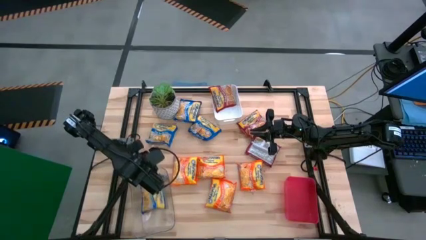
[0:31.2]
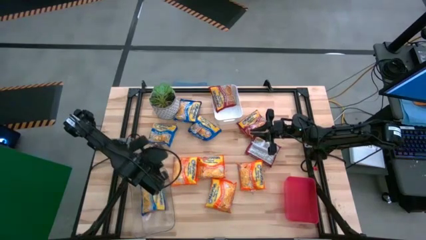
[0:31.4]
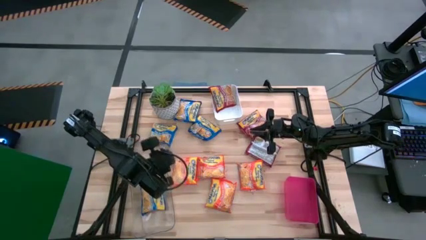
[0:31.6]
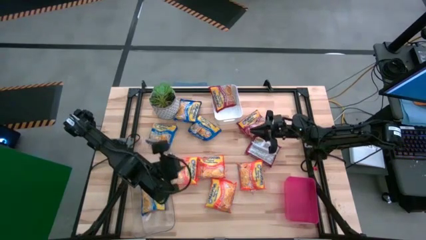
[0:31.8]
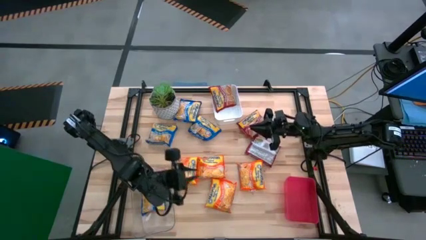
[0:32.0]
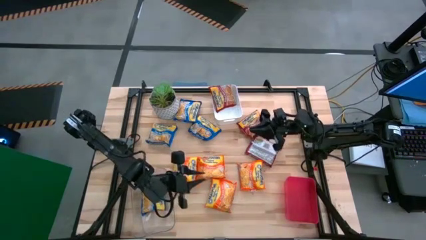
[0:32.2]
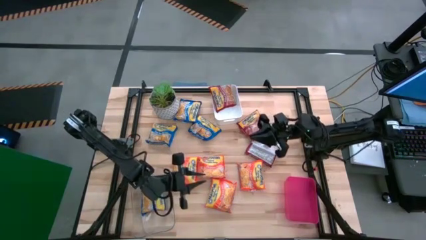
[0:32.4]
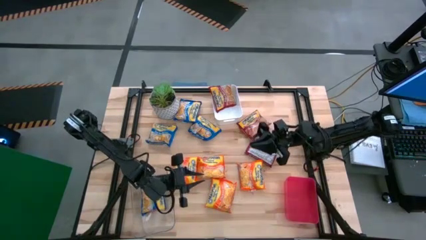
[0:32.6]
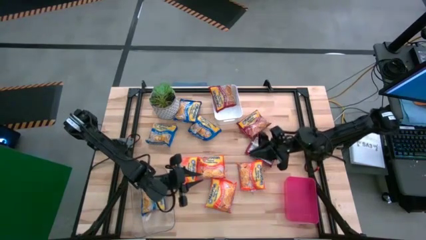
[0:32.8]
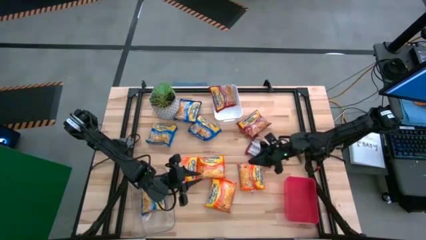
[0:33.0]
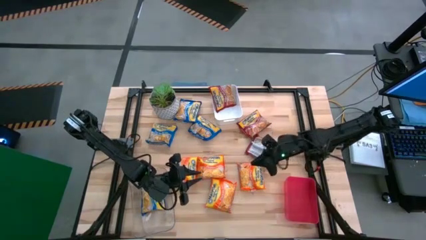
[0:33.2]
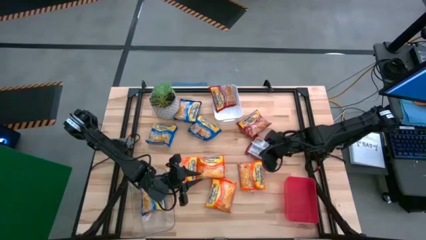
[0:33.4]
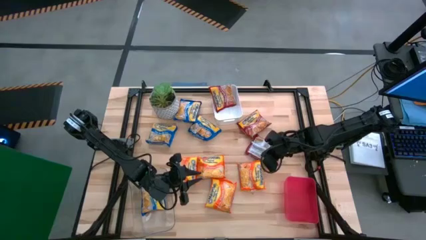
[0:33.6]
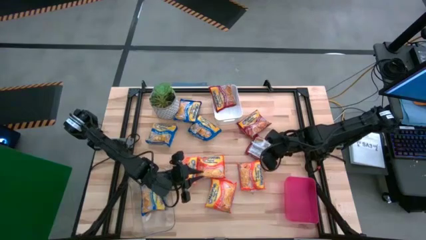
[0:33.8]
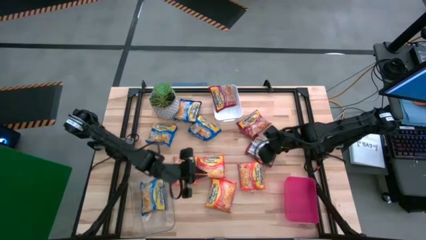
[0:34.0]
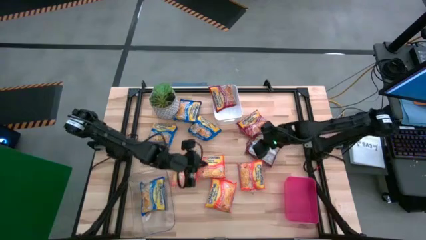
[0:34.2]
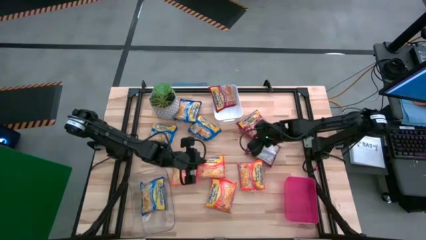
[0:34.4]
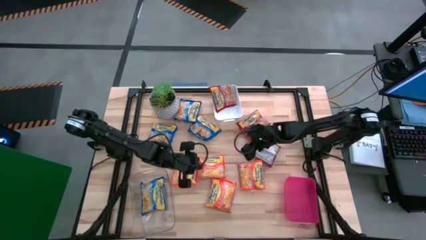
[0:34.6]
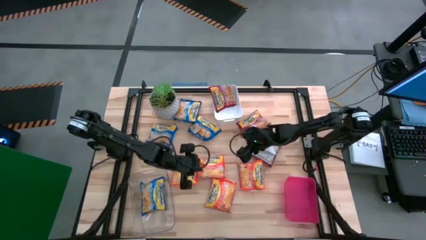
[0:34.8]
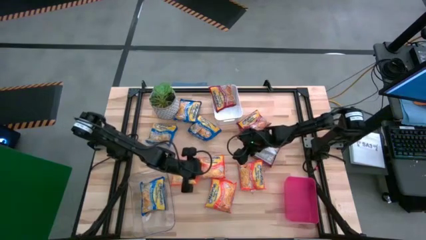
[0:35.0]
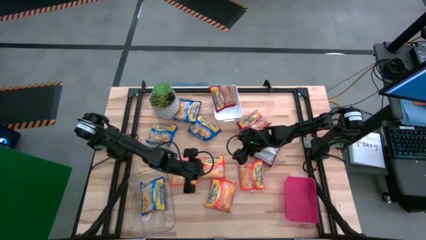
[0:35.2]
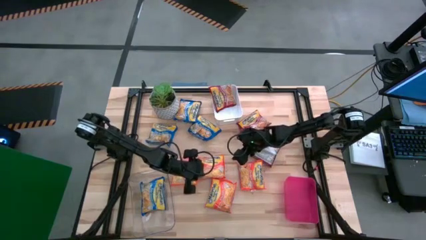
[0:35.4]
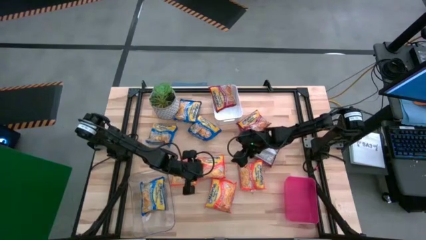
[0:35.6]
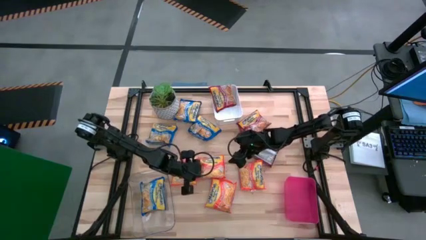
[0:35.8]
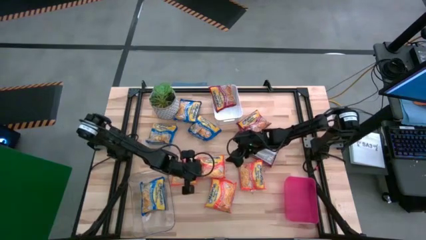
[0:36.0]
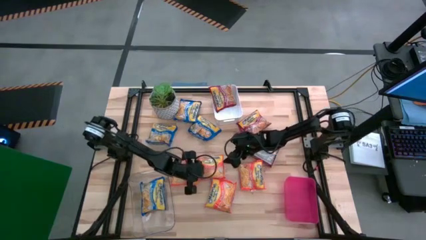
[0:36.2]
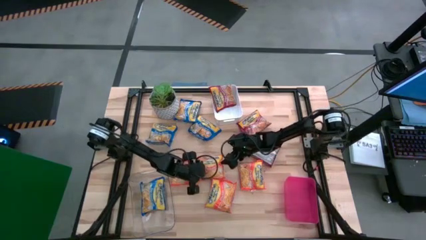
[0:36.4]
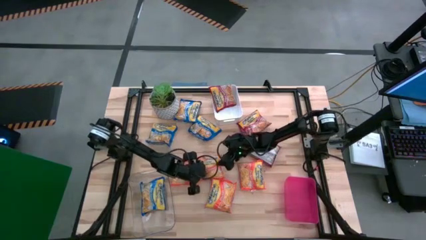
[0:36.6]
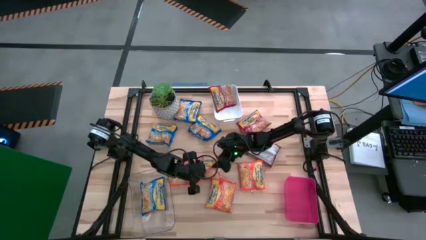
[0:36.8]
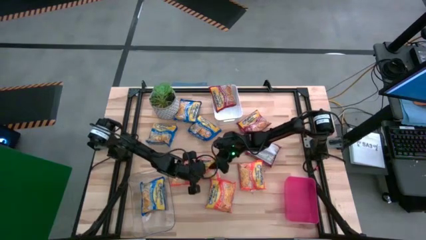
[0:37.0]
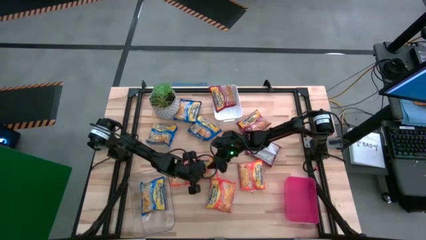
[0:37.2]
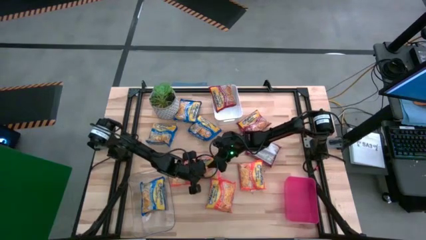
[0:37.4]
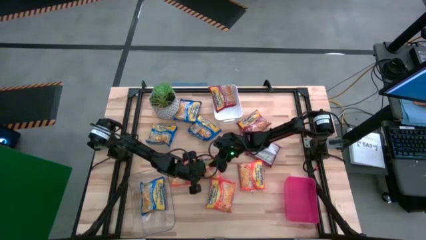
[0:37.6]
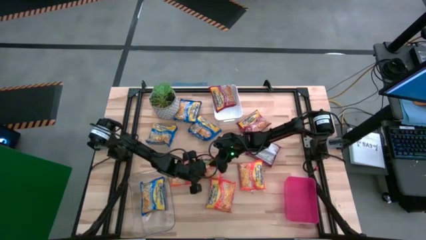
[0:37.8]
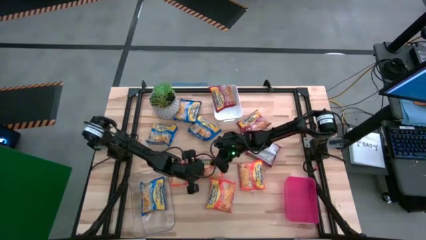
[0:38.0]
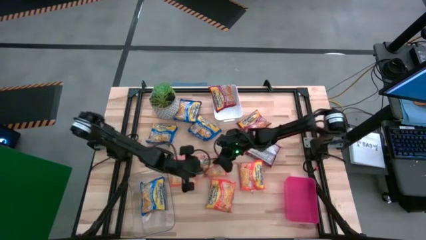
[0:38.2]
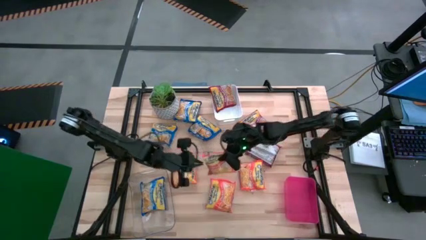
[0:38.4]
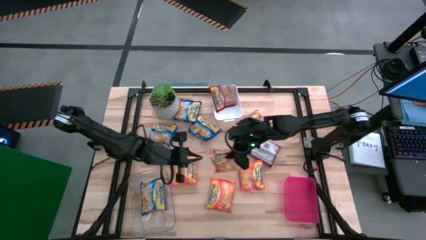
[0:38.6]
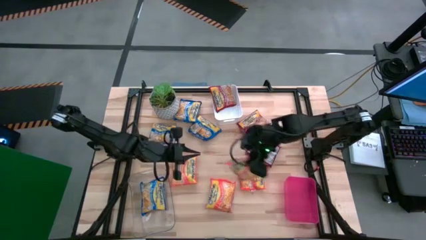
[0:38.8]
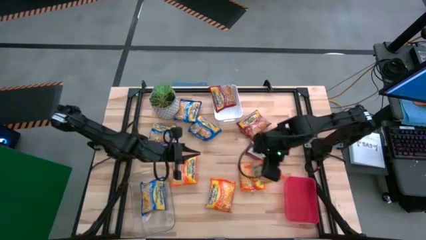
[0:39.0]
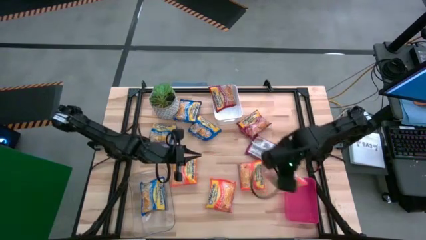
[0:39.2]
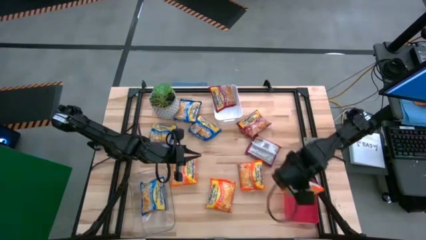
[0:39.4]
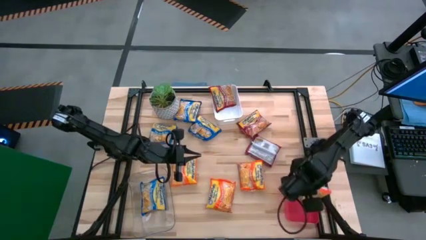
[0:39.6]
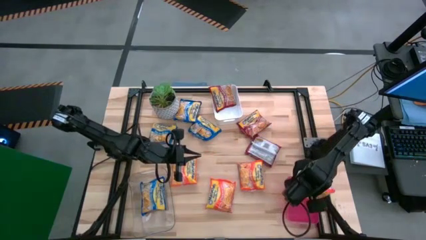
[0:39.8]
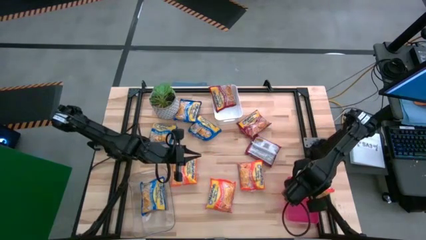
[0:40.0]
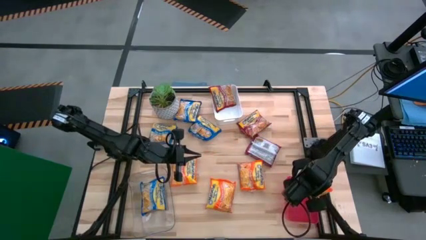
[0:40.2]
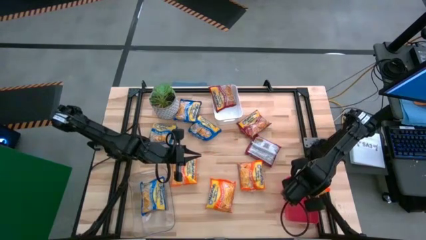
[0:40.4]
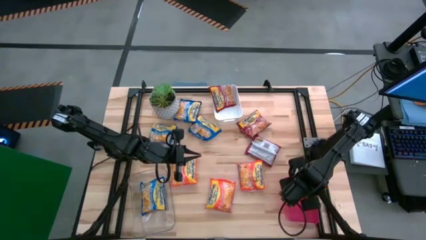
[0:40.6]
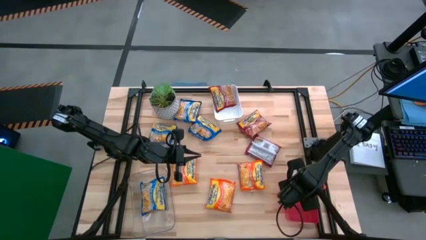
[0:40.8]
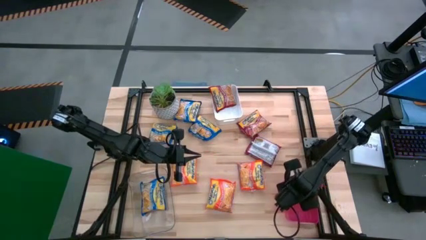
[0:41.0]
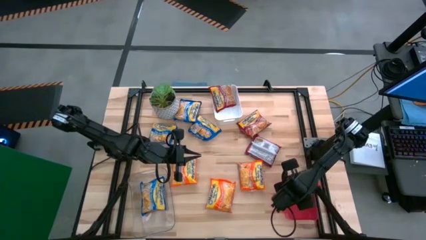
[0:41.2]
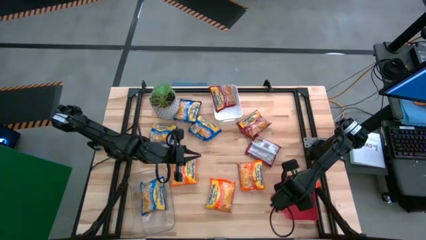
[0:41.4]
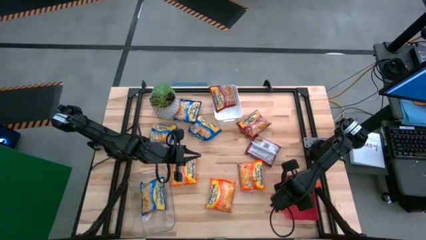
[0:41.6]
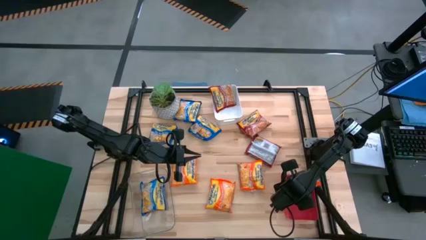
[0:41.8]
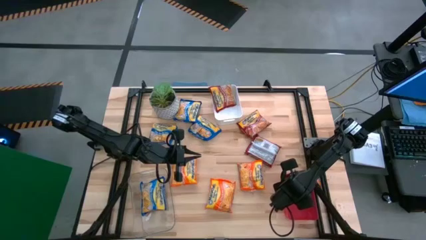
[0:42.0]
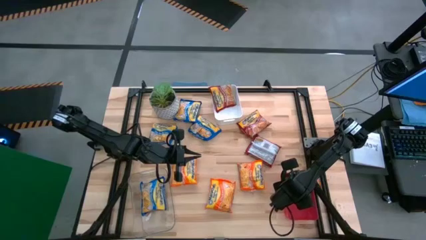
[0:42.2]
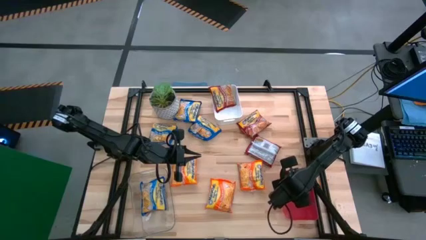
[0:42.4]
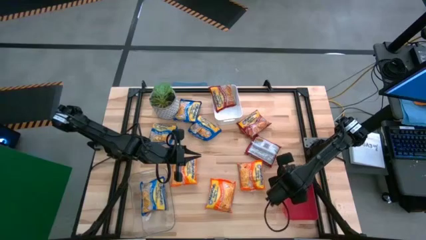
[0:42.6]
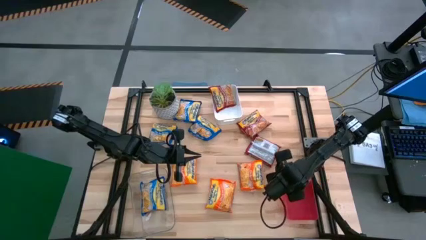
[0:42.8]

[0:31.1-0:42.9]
Task: Sort Maruchan noodles
Put the top orange noodle pack into the pink bin

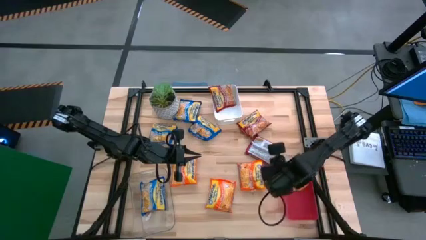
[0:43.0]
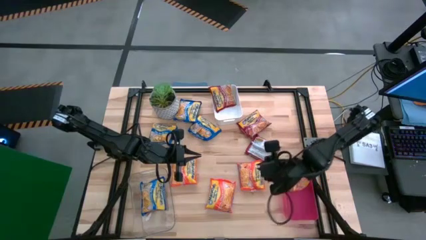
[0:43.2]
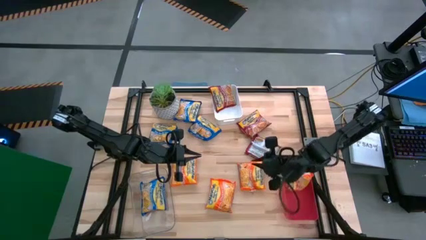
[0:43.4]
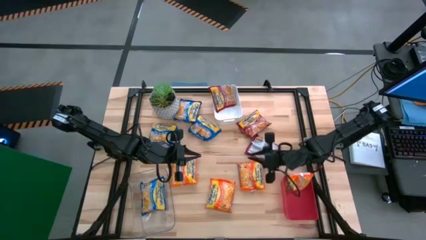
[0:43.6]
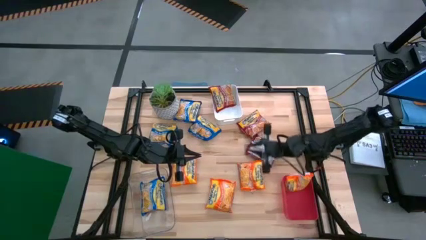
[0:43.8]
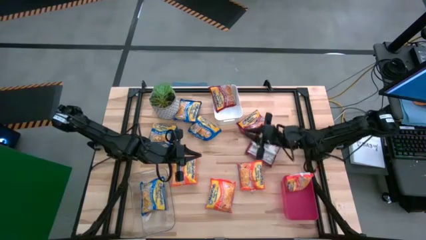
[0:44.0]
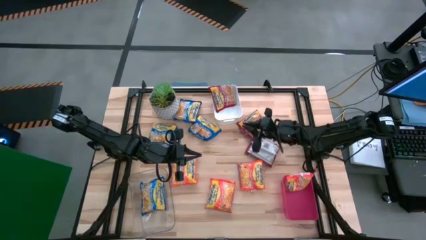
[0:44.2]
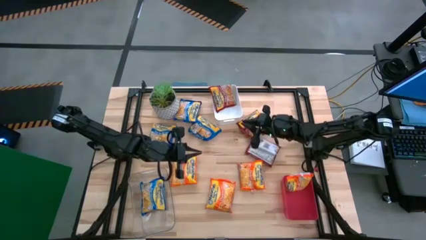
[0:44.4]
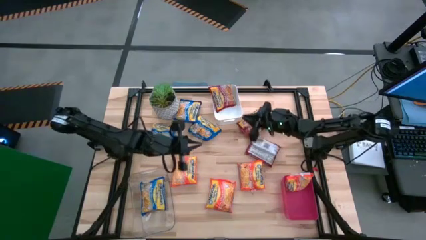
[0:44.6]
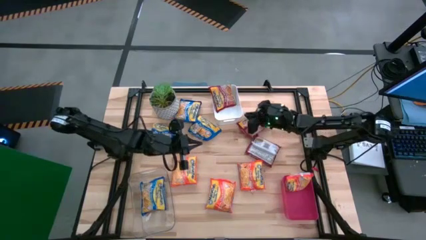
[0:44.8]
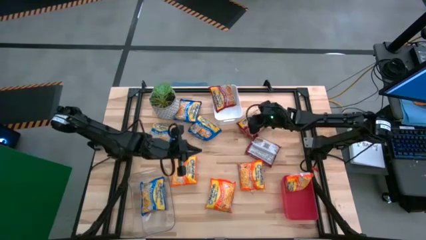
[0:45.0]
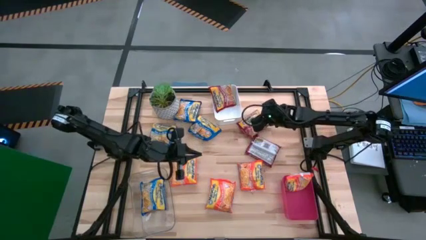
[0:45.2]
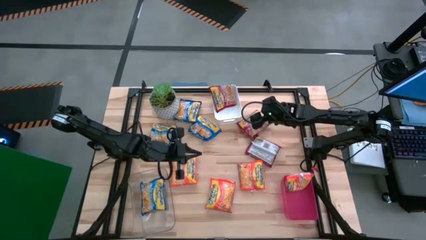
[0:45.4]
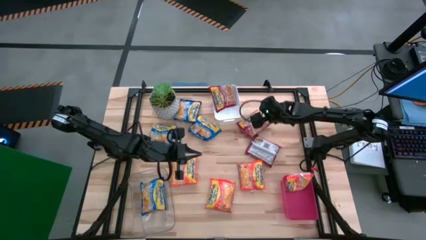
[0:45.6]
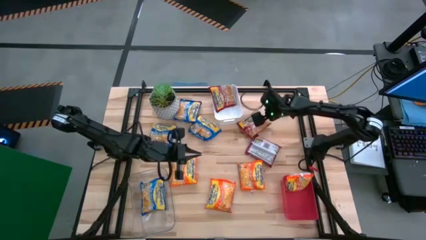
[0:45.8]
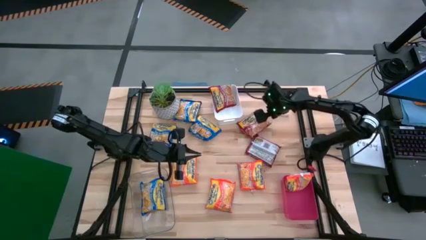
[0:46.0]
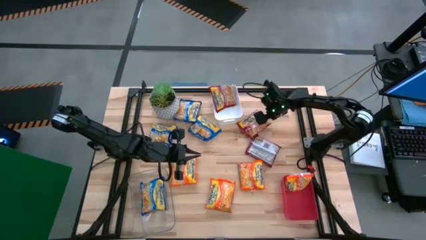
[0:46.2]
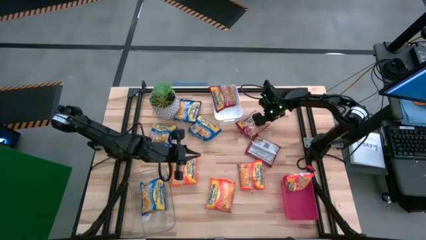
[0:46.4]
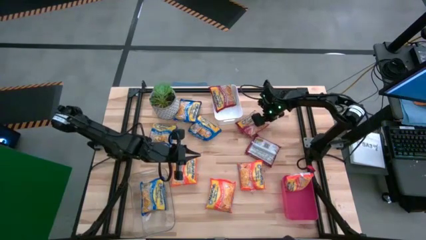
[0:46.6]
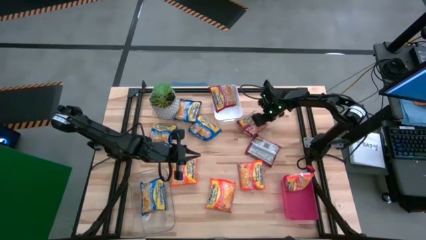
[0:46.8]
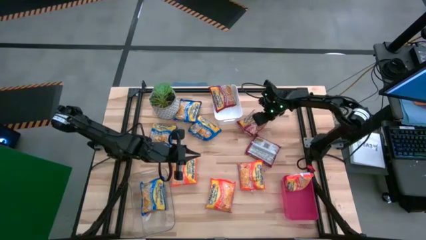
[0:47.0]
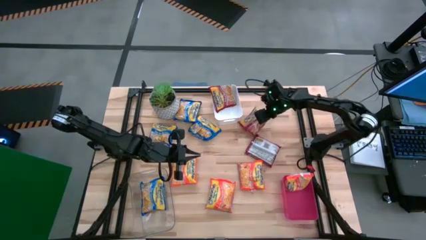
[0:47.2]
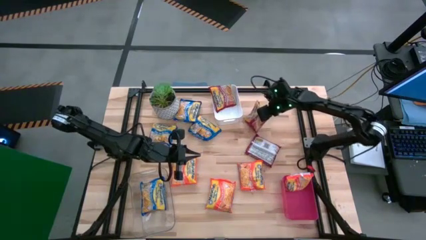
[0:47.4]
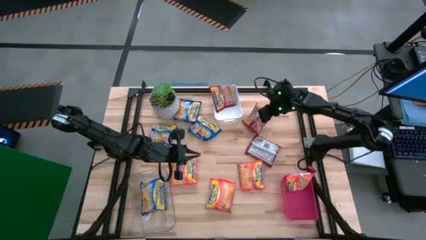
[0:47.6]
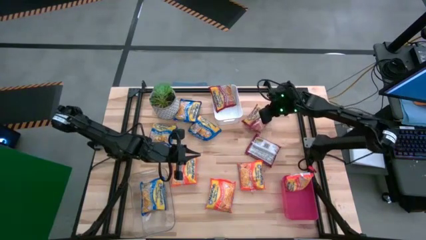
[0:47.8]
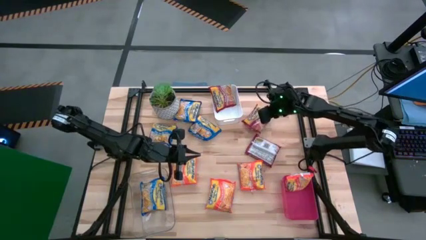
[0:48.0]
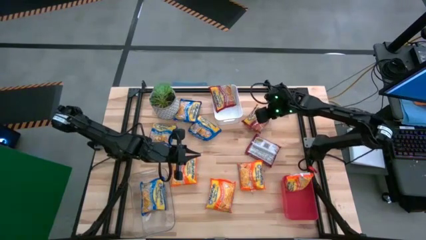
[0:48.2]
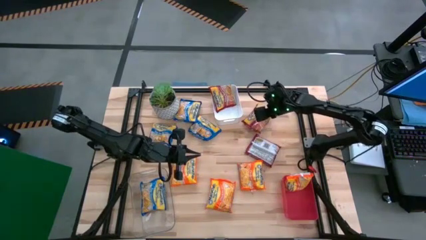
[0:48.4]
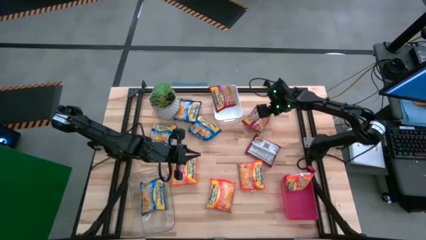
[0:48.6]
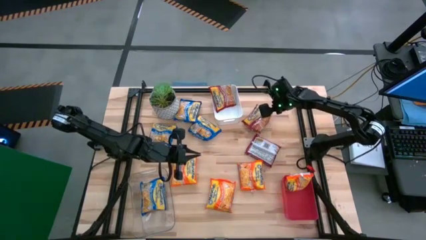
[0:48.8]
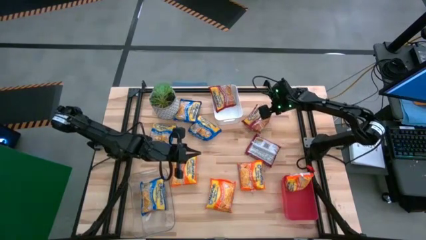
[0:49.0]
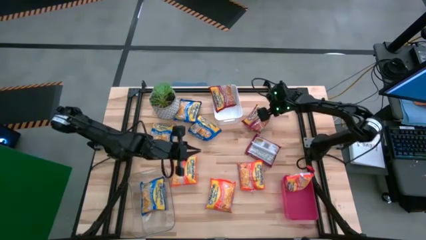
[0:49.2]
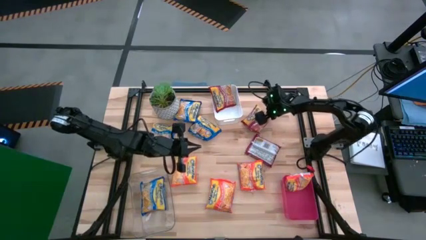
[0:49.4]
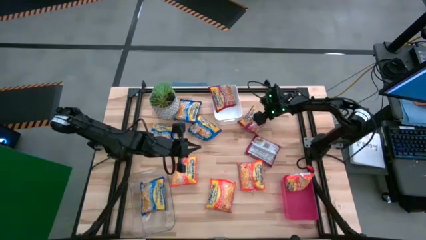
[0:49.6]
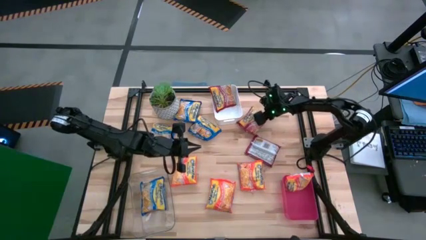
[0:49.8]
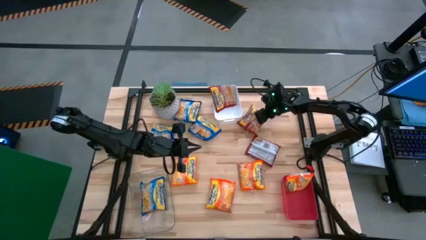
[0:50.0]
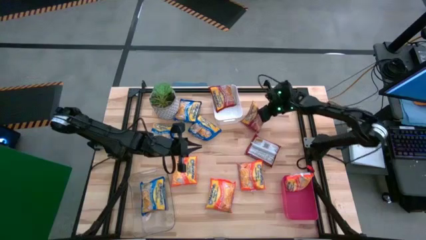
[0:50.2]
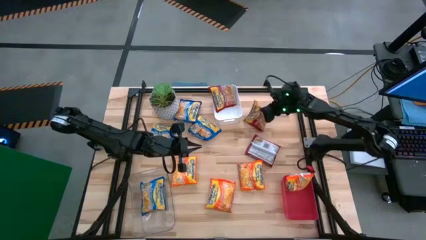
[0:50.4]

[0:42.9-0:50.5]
Put the top red noodle pack into the white bin
